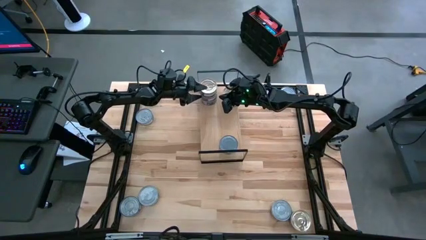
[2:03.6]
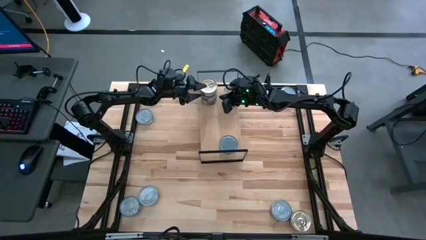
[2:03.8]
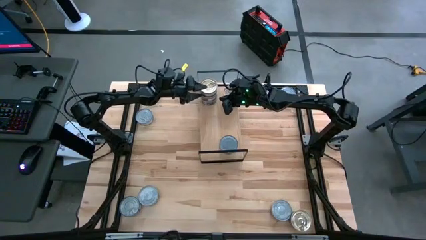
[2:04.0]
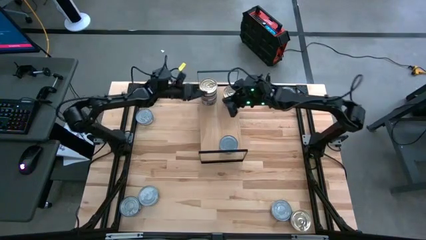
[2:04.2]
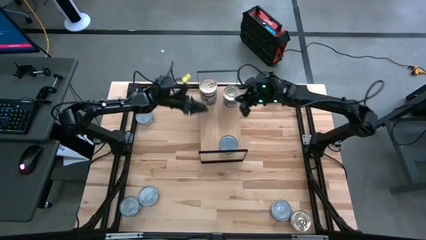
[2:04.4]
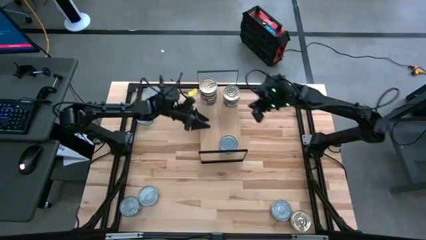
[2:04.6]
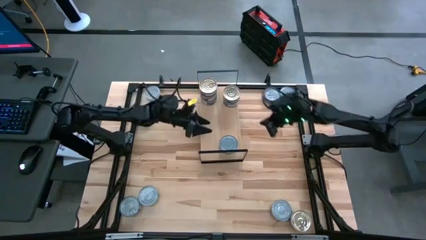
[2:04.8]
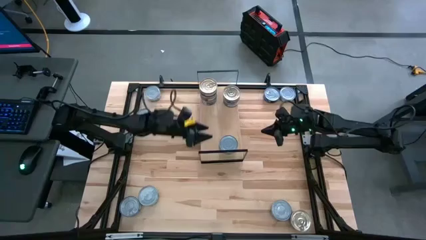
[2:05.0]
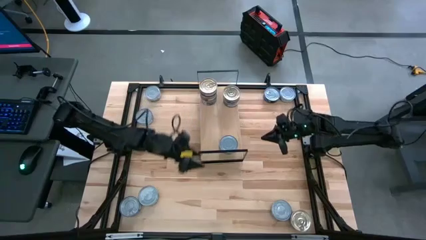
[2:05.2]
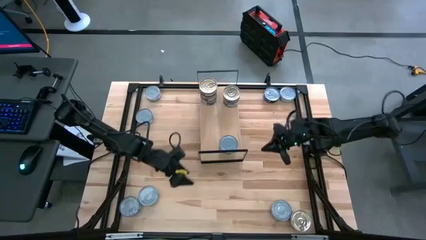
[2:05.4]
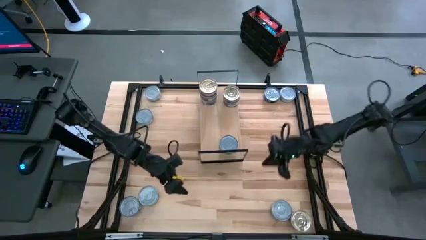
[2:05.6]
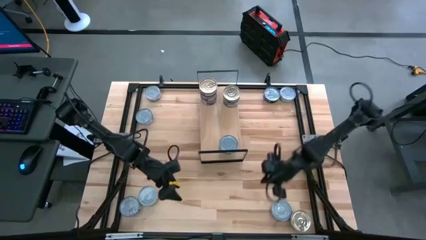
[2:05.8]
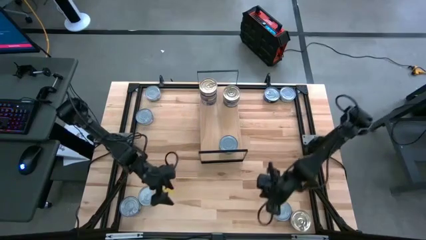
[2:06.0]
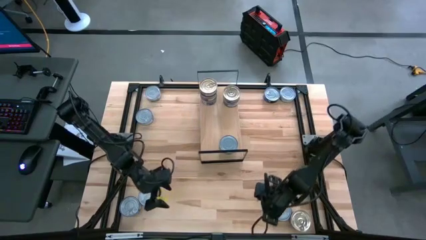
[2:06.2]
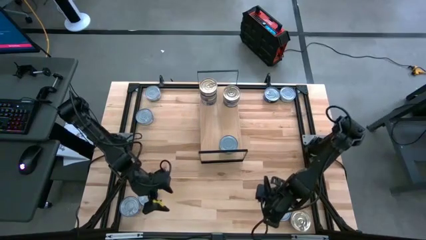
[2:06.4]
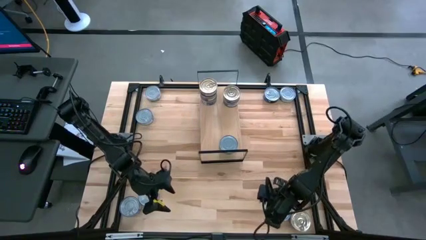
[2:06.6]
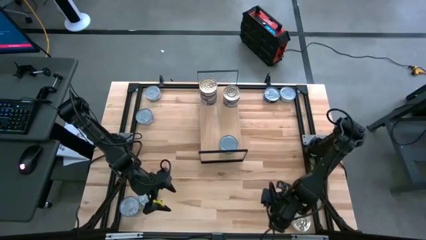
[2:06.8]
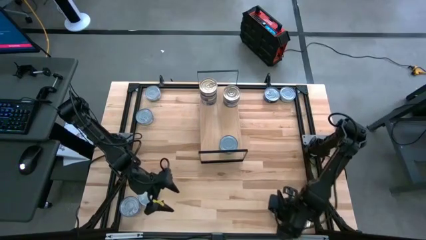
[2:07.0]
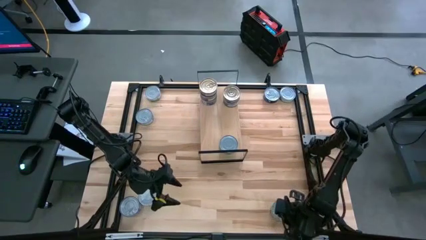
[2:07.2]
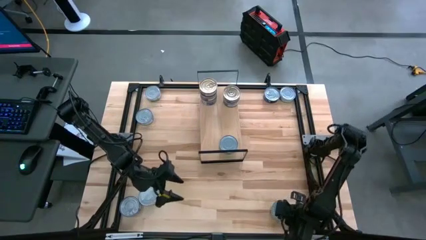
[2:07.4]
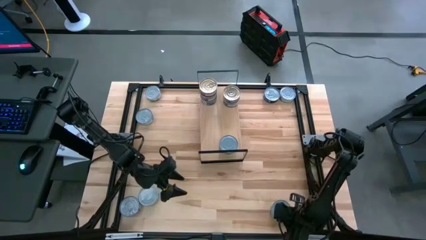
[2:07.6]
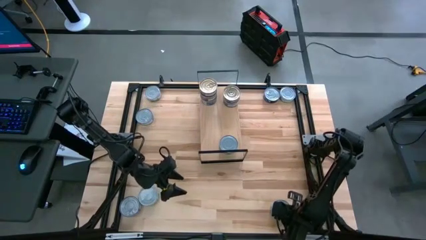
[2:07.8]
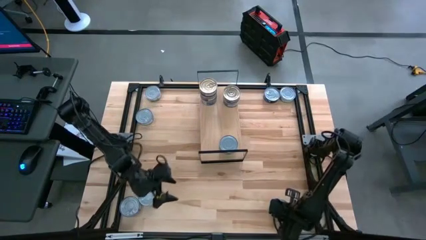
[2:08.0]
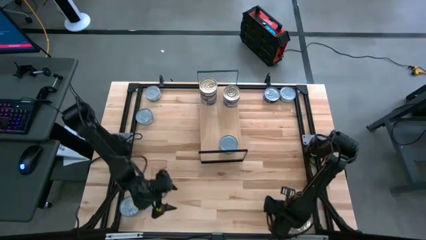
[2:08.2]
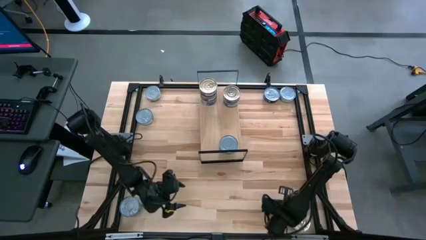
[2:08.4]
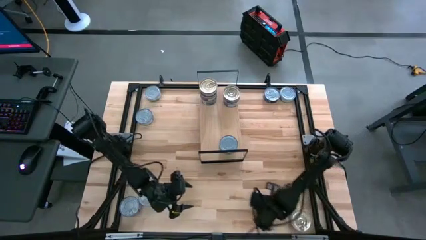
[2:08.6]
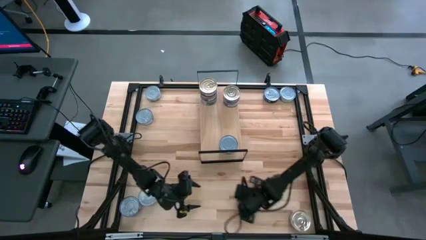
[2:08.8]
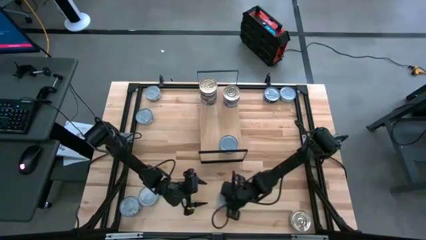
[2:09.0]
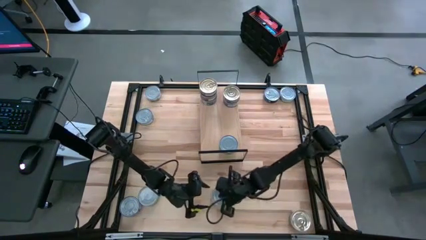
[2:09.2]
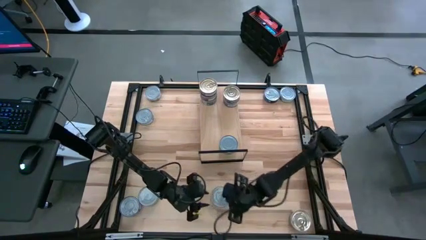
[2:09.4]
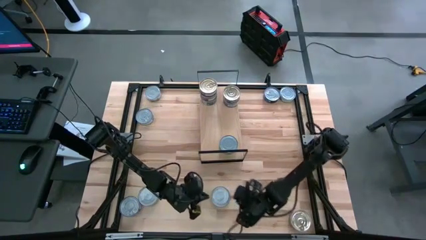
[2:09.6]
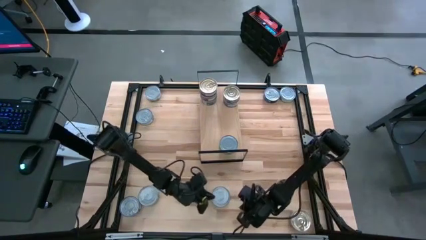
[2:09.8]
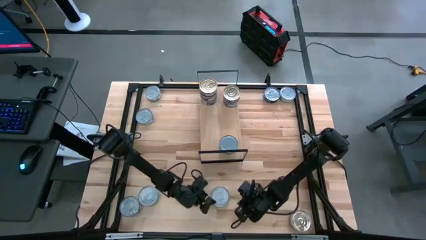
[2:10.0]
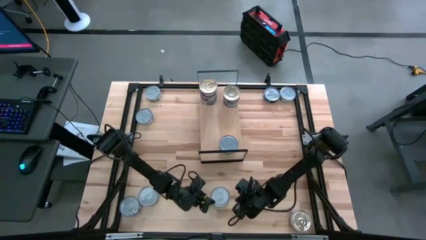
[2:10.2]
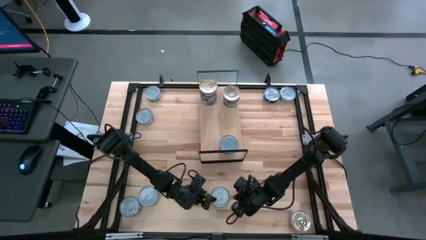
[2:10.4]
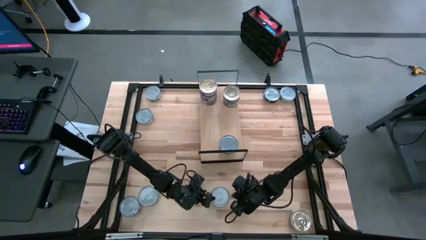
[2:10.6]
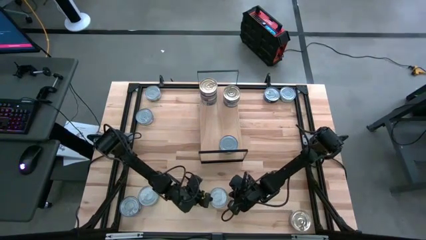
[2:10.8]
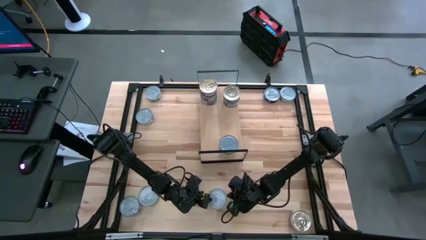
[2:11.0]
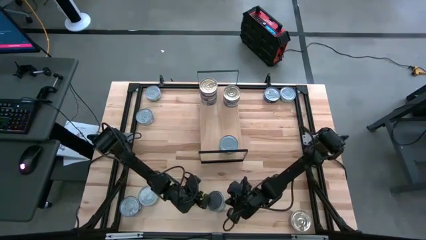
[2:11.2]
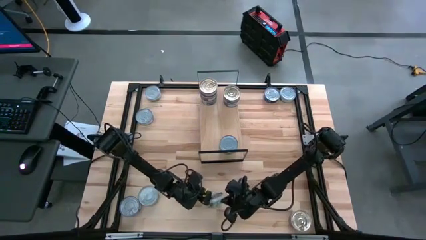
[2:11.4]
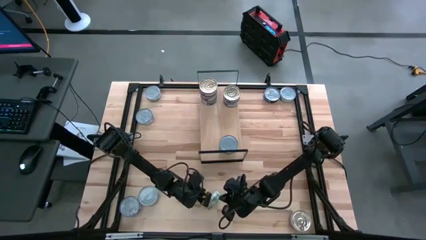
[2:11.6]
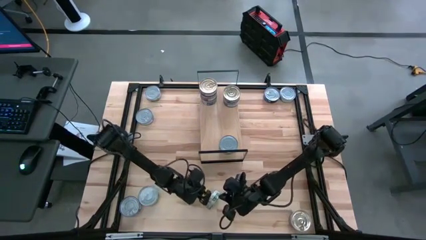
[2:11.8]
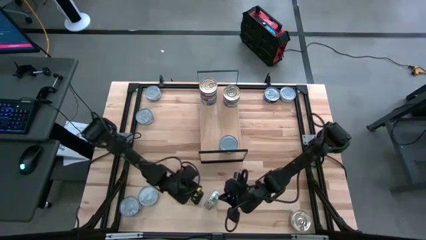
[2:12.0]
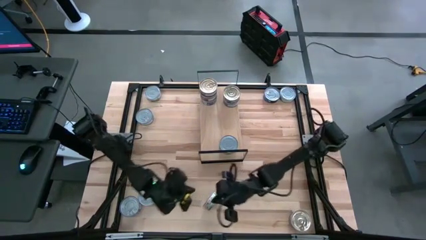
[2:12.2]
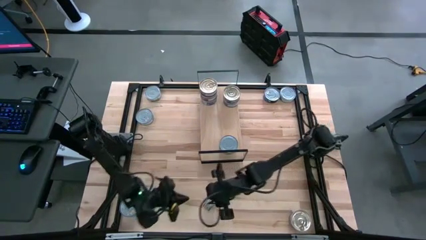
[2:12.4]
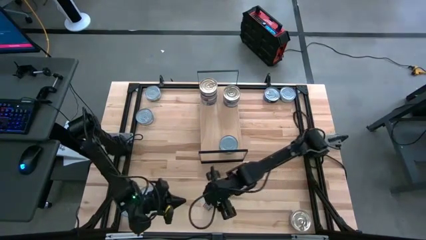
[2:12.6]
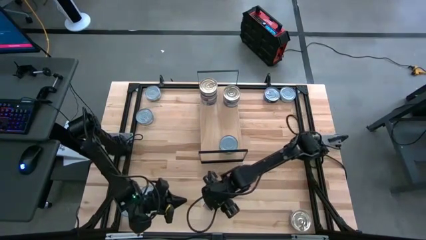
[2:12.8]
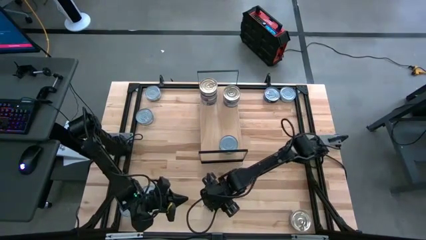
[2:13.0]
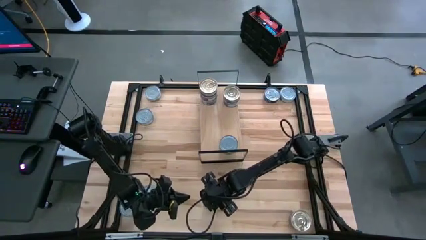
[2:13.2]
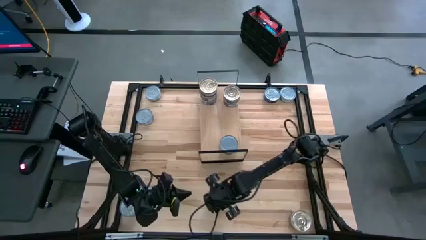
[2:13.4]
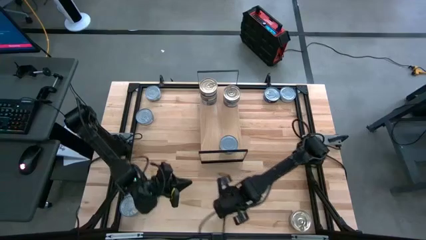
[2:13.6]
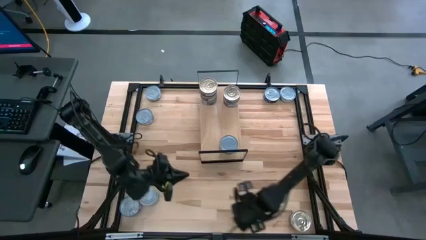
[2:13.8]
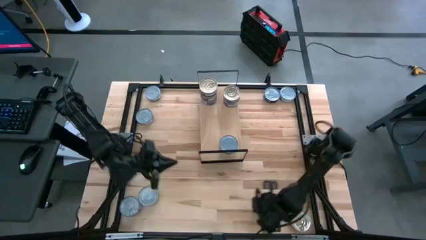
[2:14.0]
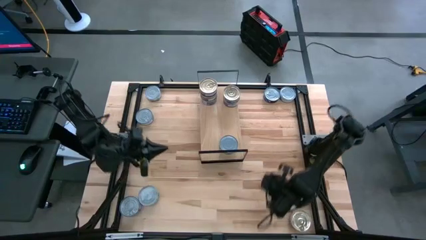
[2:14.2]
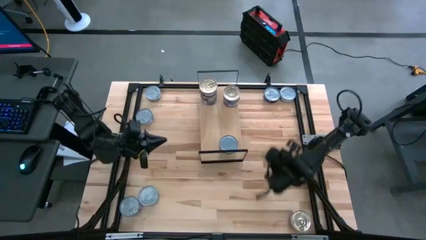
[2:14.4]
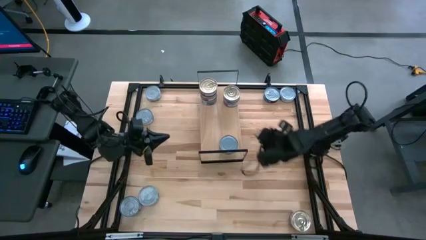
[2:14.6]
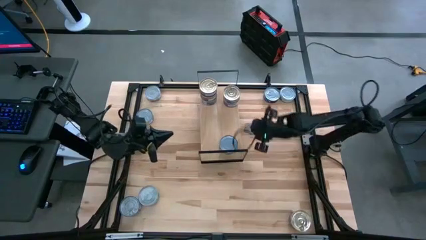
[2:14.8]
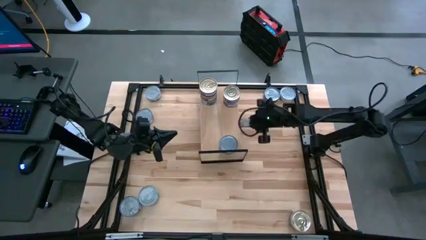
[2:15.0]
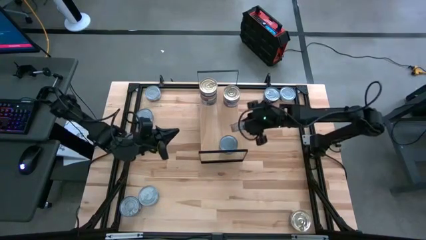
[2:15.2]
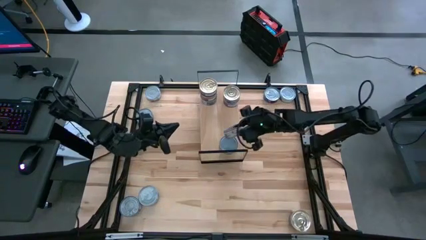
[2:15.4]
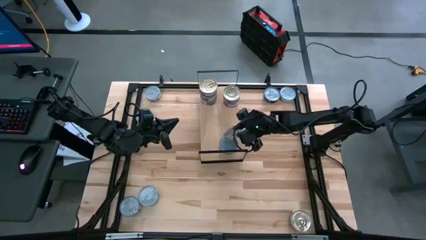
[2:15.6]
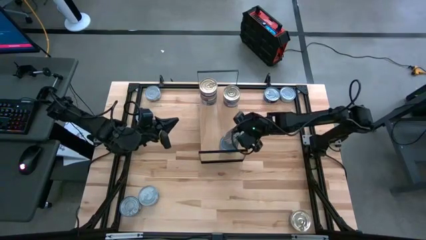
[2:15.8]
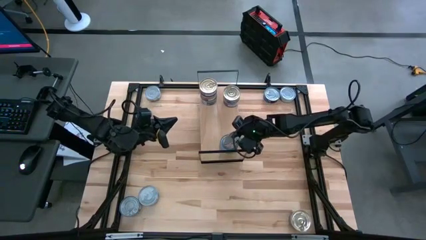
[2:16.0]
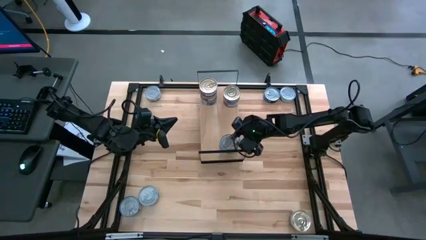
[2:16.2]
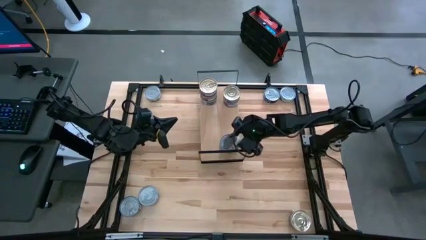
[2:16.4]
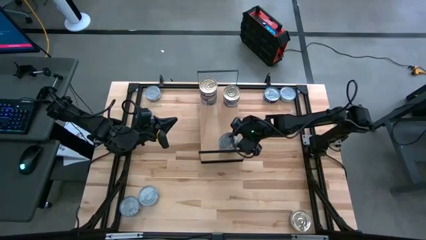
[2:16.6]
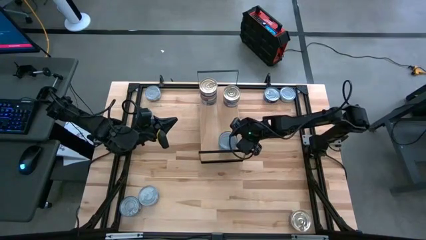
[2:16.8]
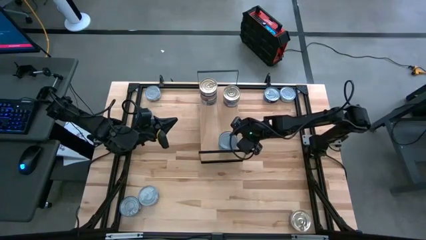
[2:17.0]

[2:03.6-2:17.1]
Task: Stack canned seafood by type on shelf
Stack the green tuna can on top of the other green tuna can on the shelf
